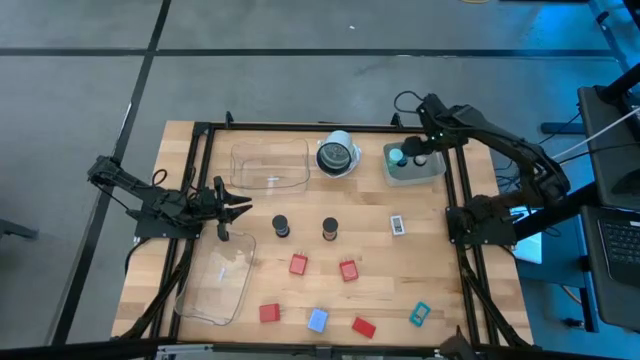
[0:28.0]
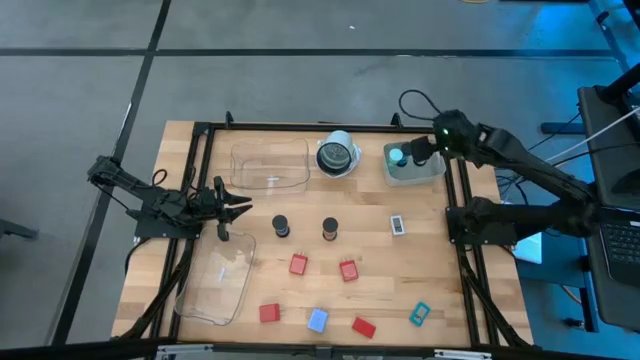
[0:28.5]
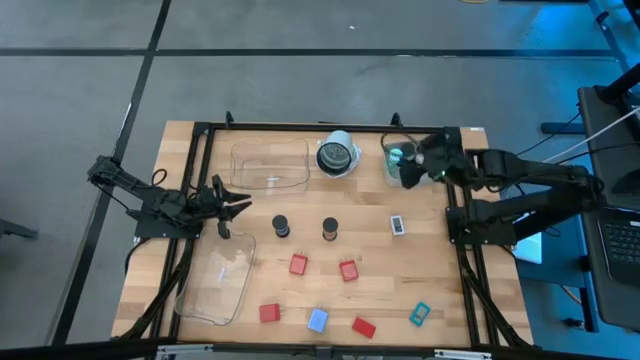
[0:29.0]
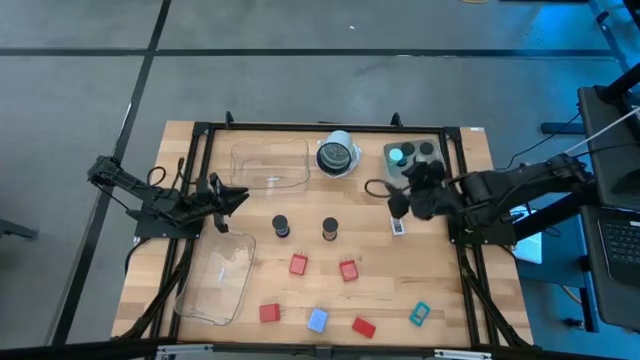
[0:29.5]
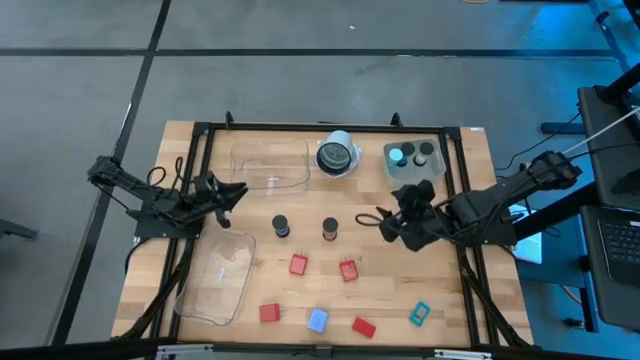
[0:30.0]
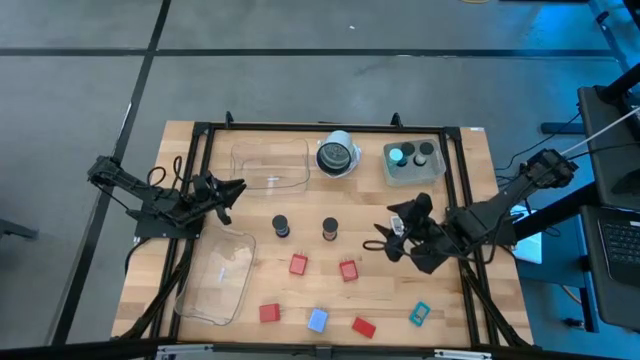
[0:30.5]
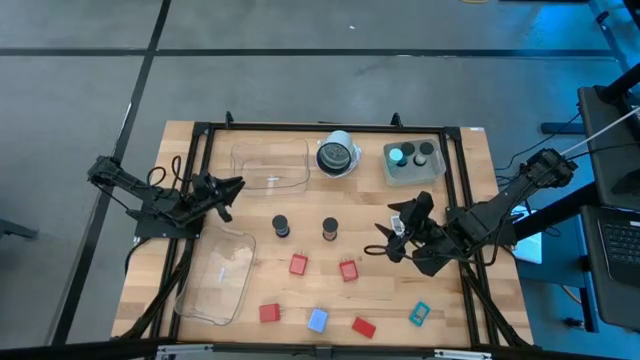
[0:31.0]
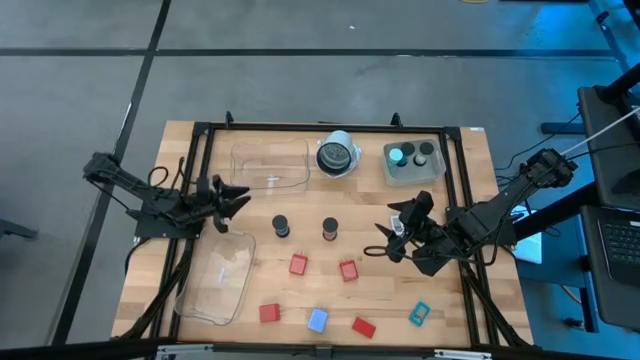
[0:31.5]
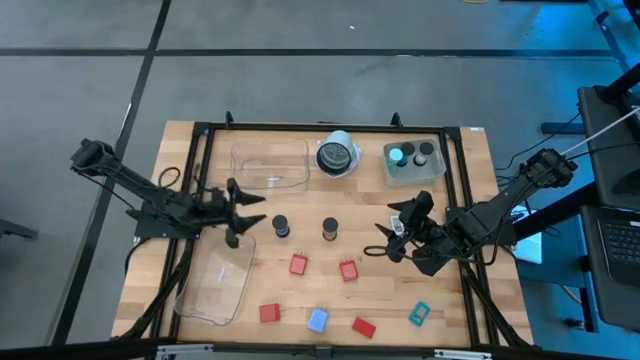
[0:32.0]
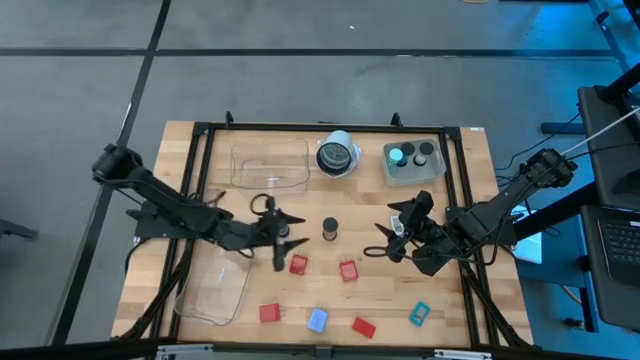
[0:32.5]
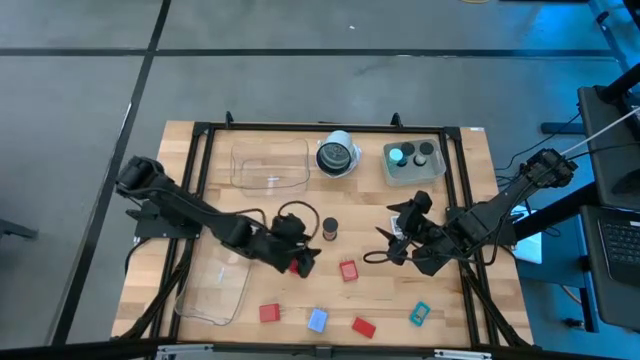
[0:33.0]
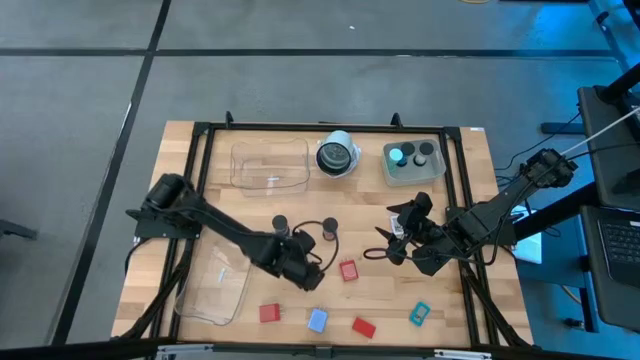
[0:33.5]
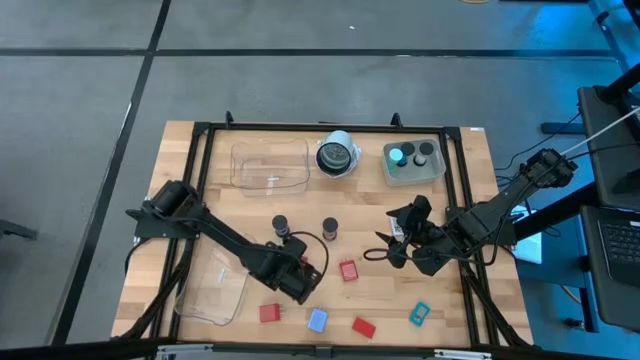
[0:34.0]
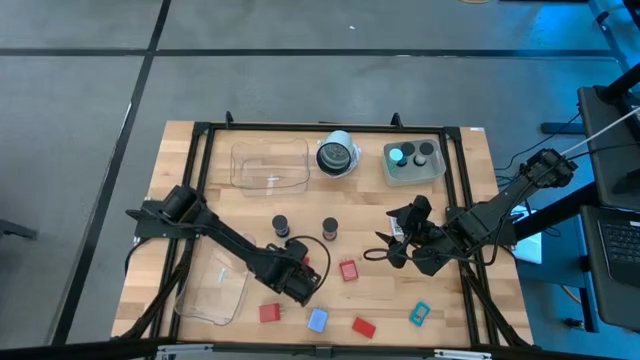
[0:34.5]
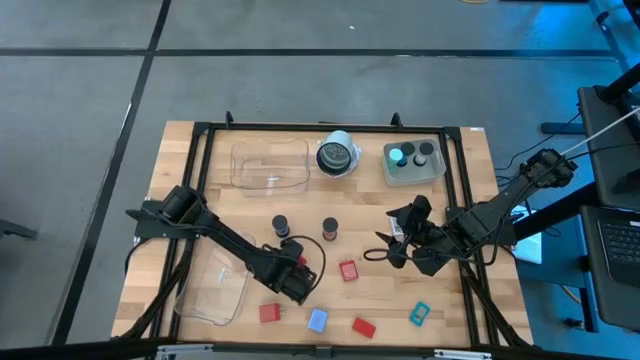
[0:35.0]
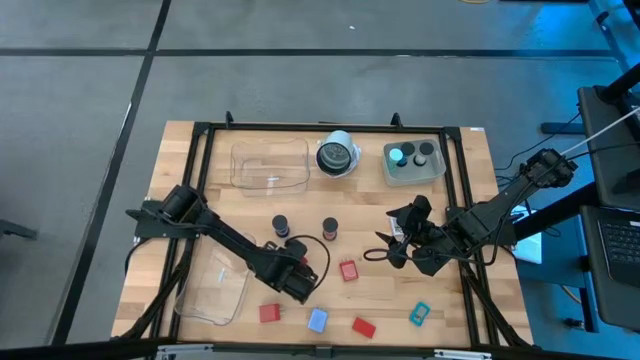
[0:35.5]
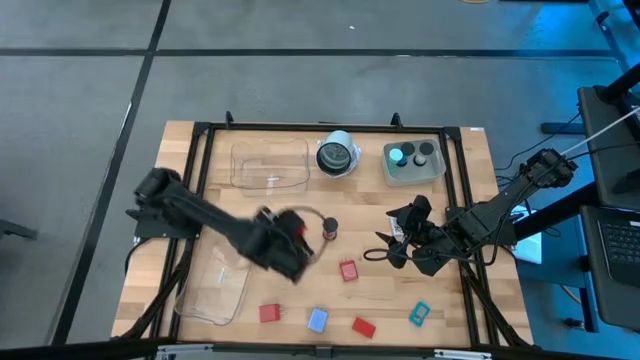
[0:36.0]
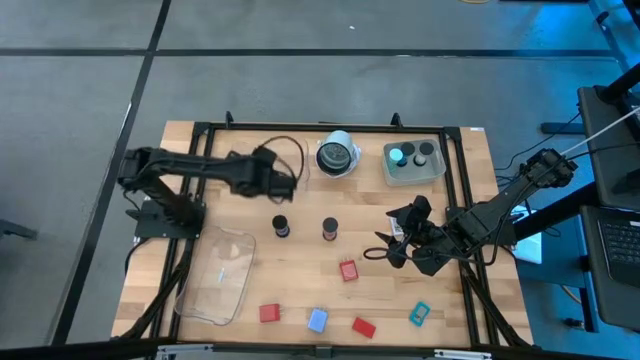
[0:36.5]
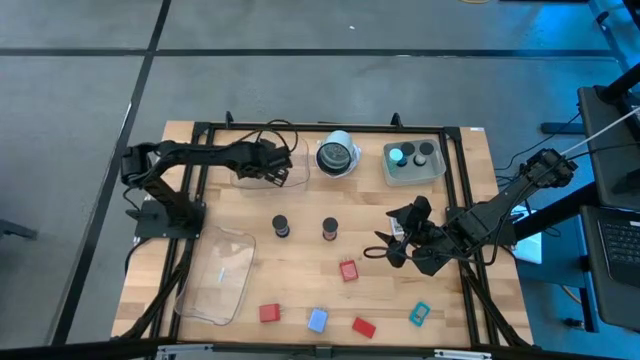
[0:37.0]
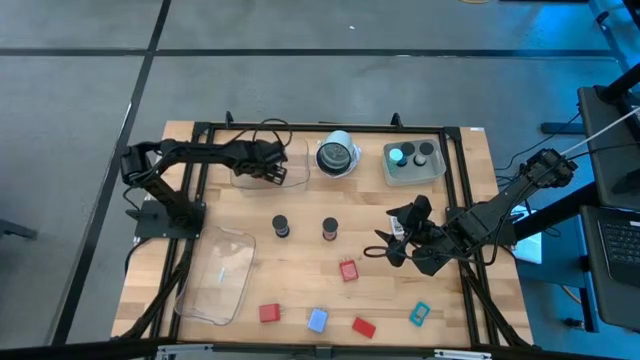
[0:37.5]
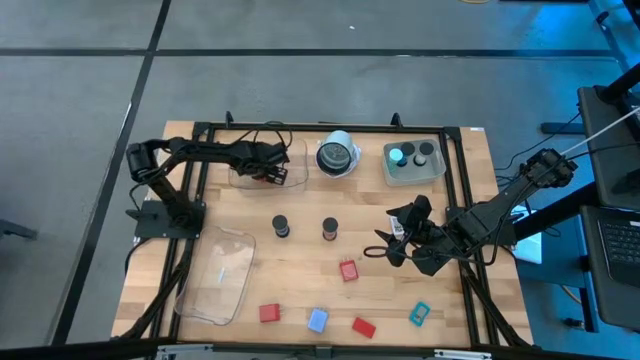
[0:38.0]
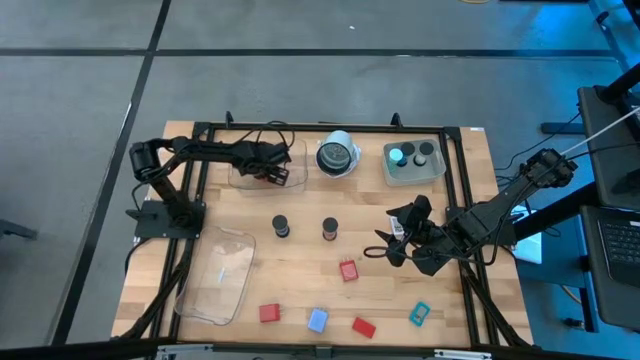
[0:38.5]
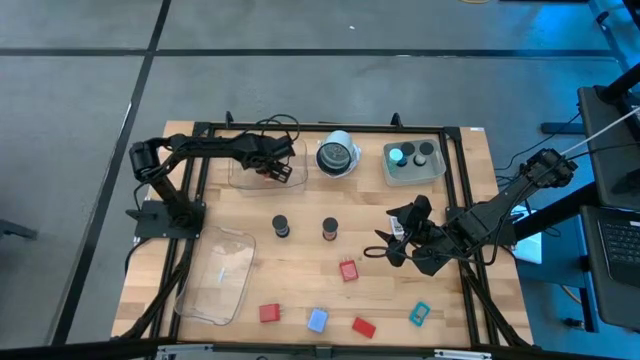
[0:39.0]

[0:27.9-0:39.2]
Task: Pick & Place Office items
Put the top left red charger adapter into the top transparent bin

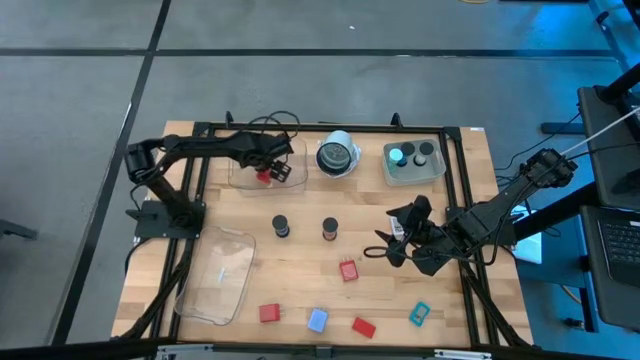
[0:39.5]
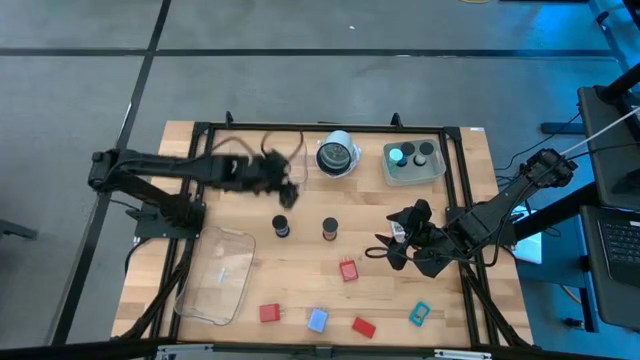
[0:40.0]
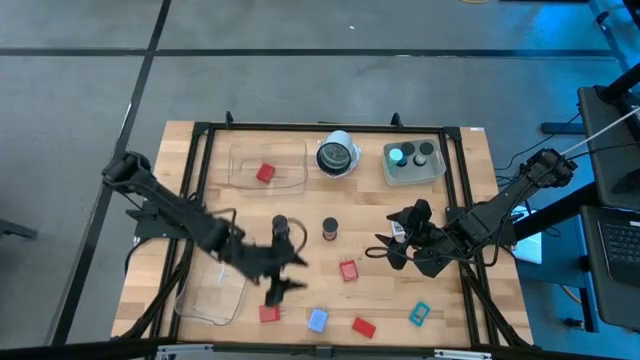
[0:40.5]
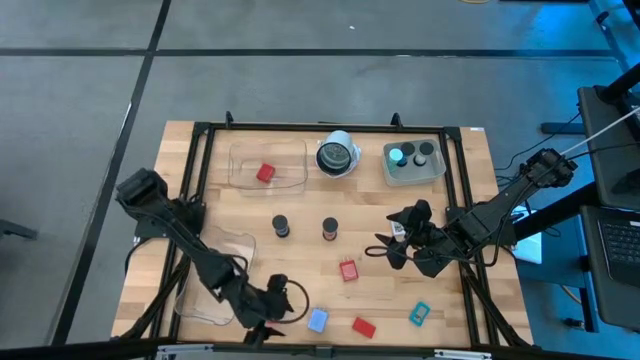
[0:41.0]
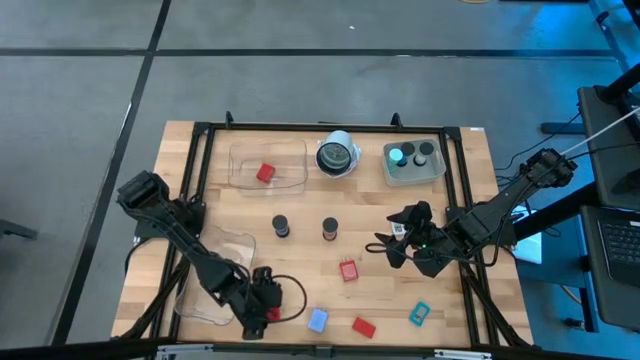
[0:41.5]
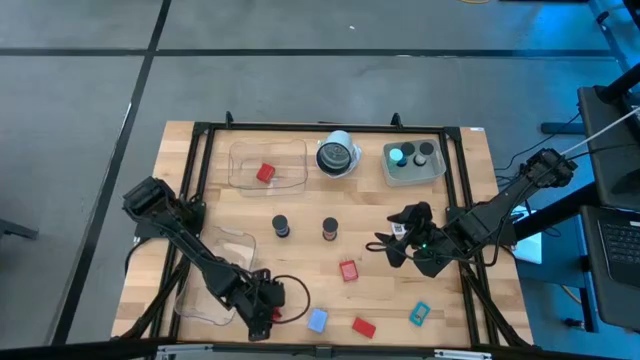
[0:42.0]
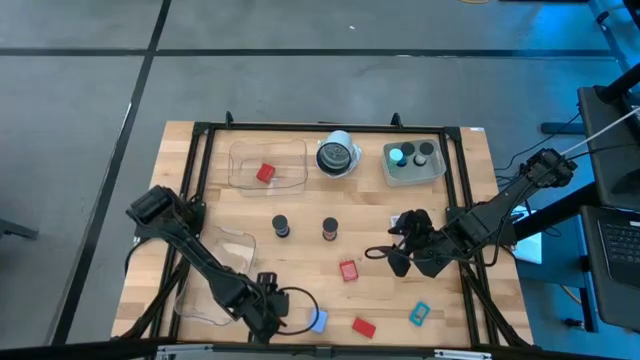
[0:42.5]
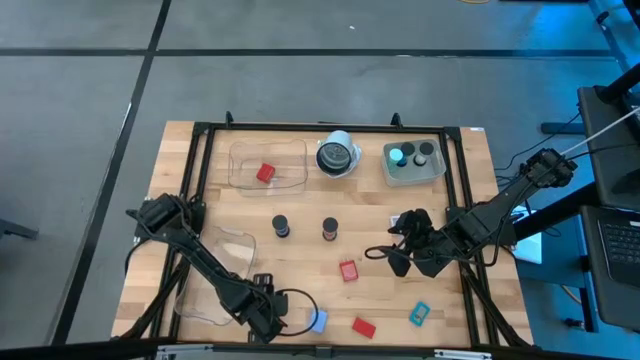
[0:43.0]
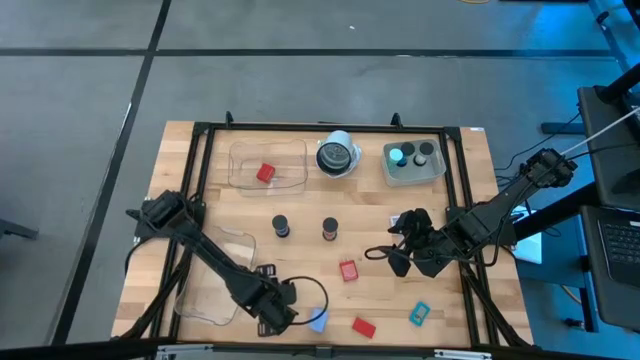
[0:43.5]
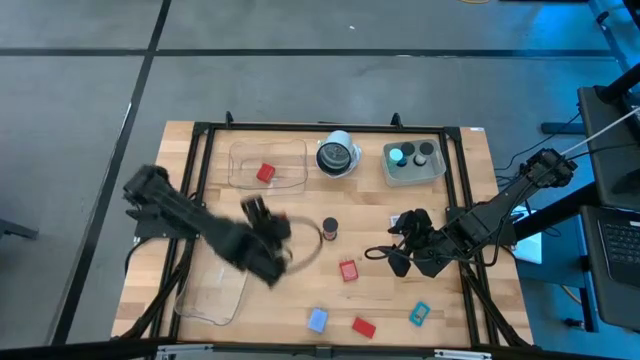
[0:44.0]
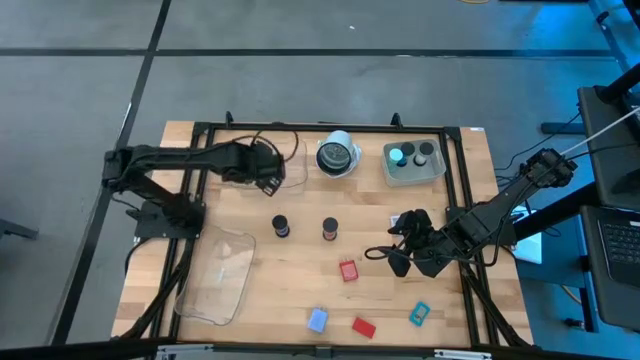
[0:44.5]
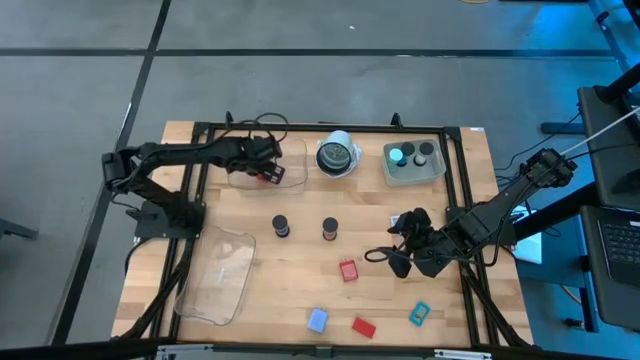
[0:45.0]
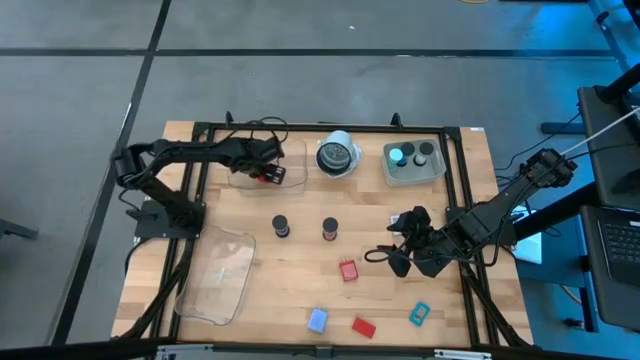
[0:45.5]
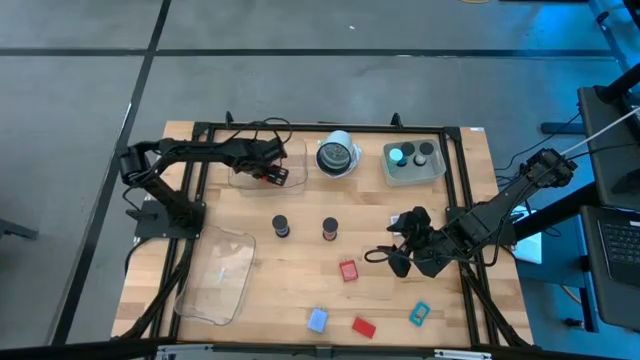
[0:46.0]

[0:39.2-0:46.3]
Put the left red charger adapter into the top transparent bin

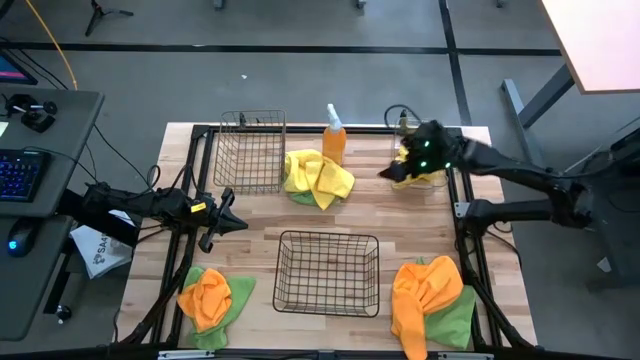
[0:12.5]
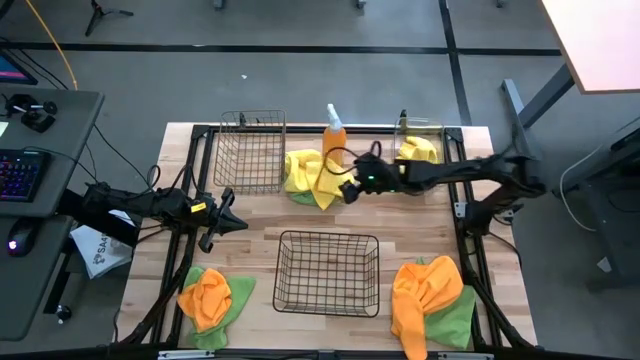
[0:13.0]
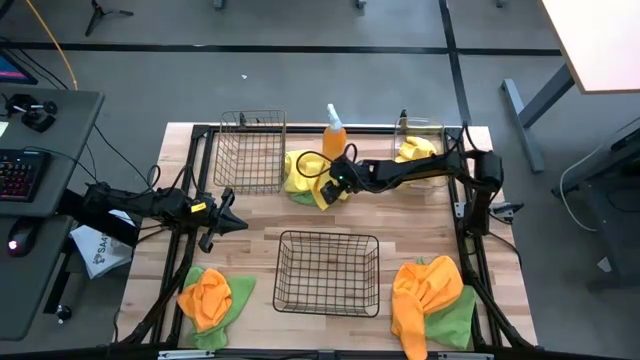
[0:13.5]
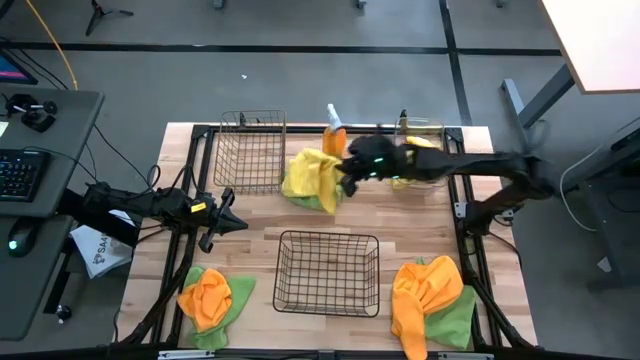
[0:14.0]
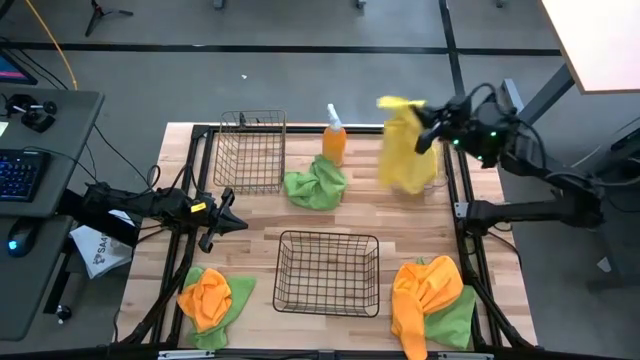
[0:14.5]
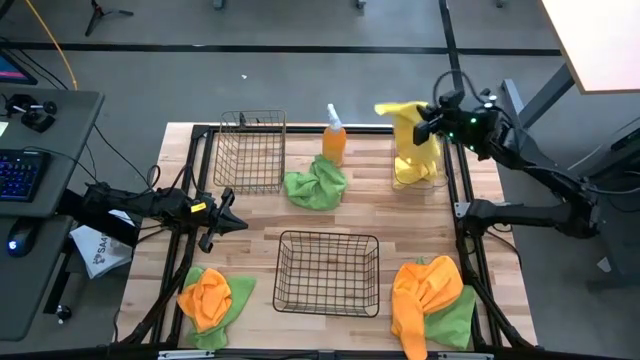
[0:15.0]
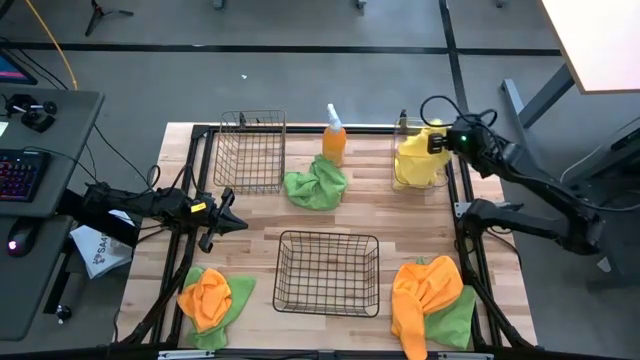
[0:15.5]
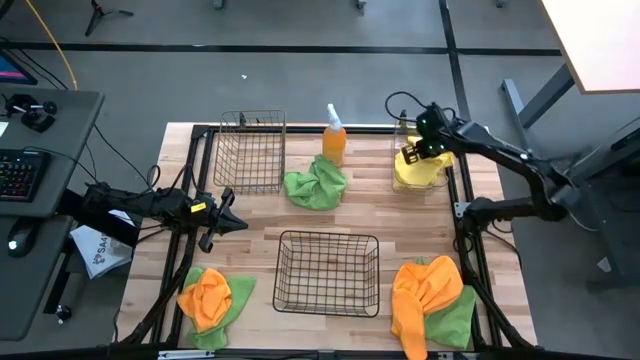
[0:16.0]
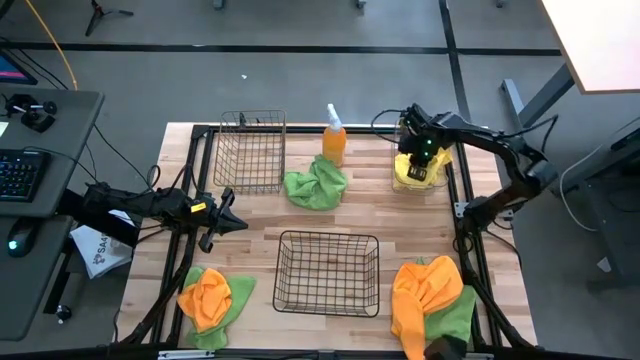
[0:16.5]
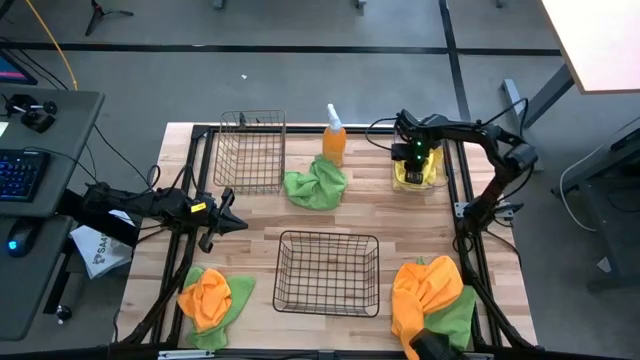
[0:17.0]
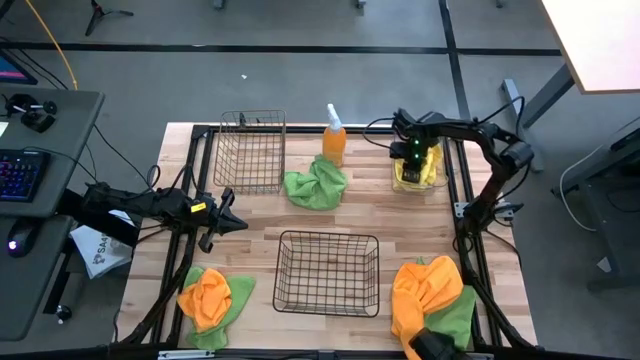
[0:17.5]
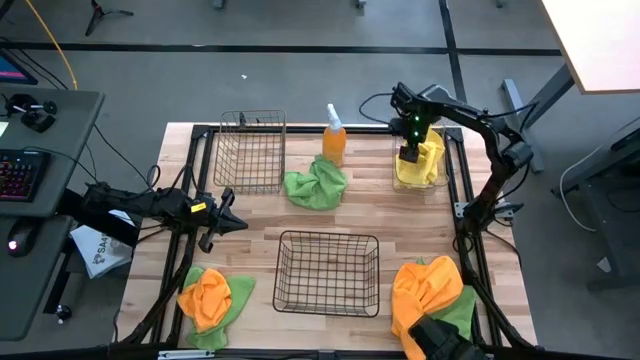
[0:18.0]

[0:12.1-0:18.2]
Task: Sort microfiber towel by color & place in baskets
Put the yellow microfiber towel into the transparent bin
